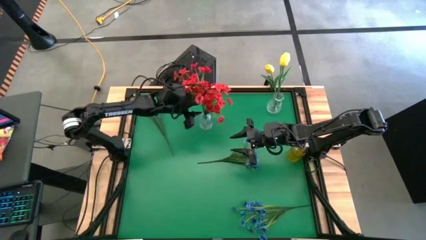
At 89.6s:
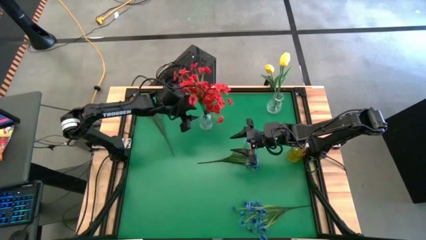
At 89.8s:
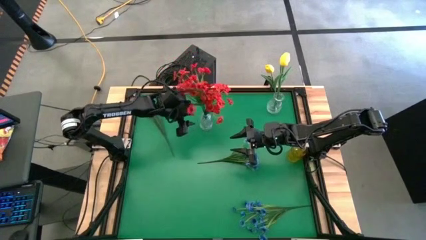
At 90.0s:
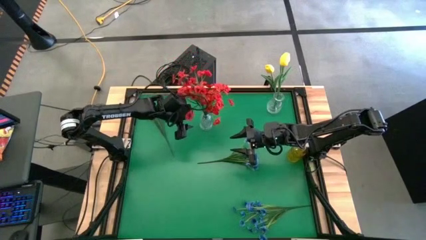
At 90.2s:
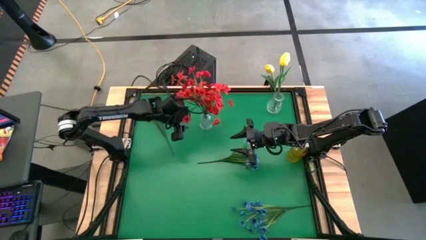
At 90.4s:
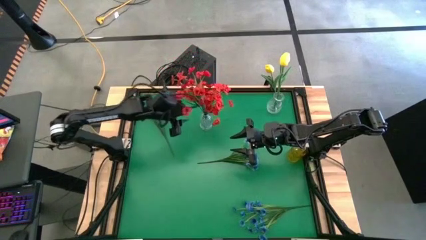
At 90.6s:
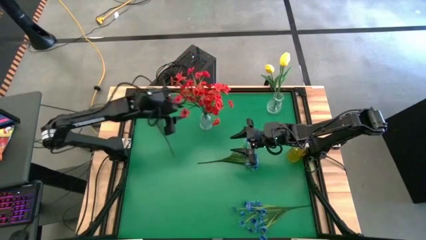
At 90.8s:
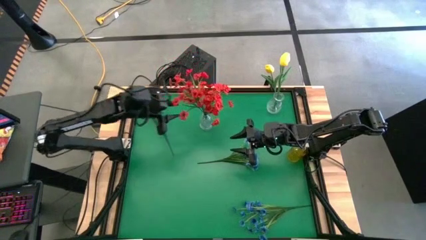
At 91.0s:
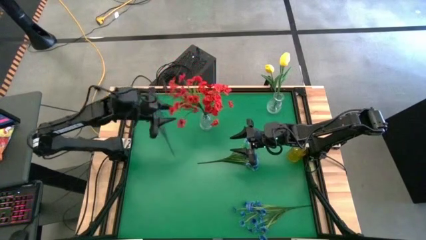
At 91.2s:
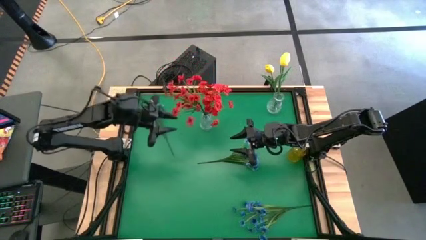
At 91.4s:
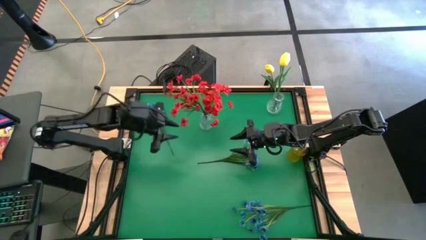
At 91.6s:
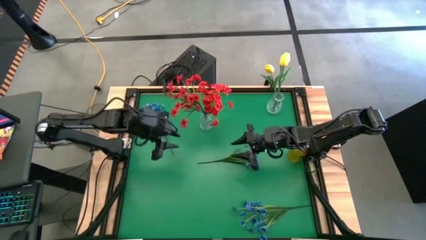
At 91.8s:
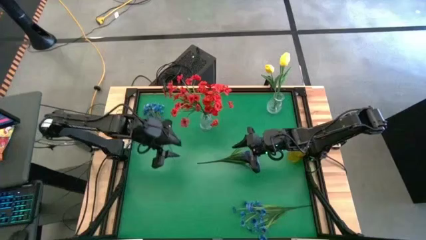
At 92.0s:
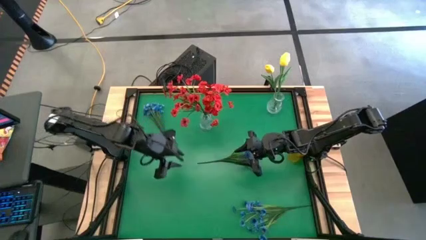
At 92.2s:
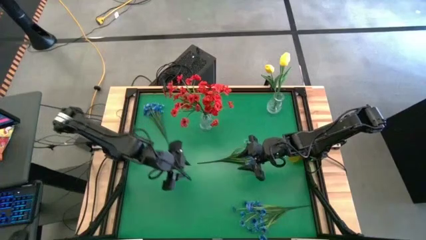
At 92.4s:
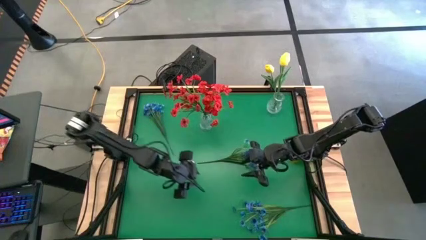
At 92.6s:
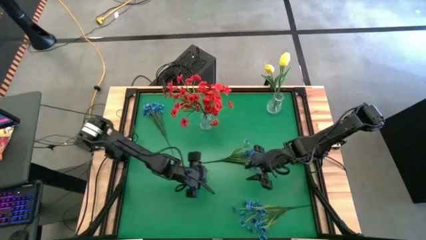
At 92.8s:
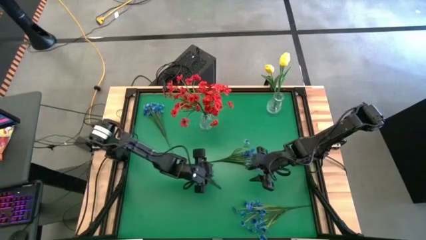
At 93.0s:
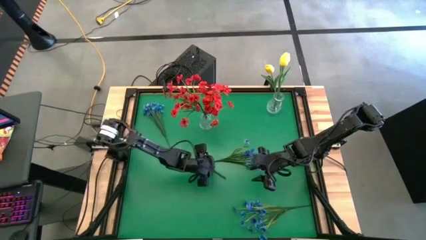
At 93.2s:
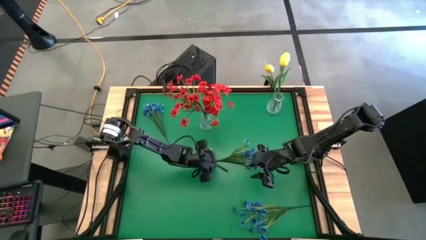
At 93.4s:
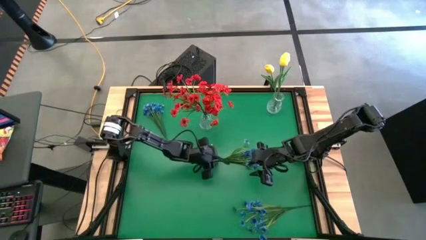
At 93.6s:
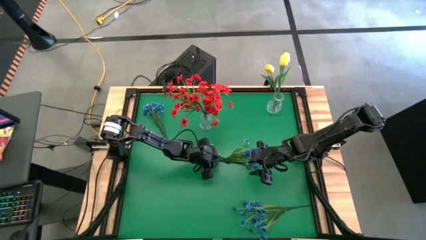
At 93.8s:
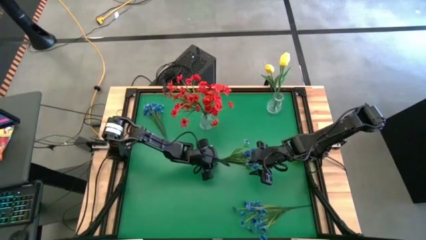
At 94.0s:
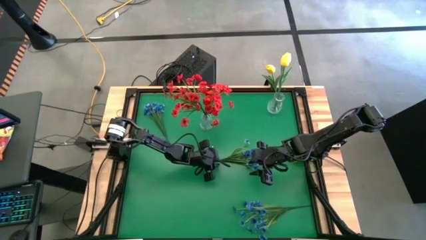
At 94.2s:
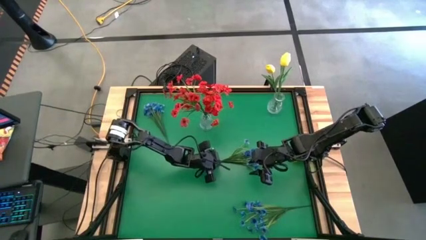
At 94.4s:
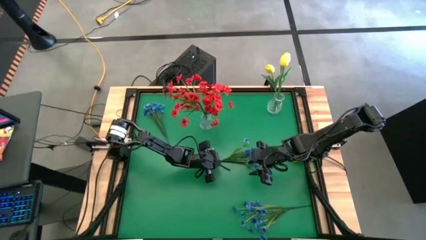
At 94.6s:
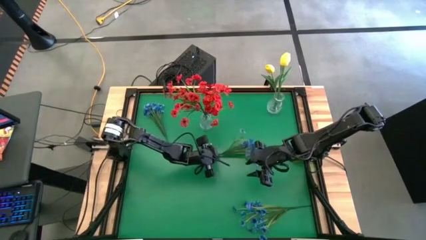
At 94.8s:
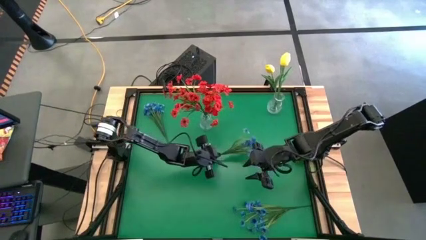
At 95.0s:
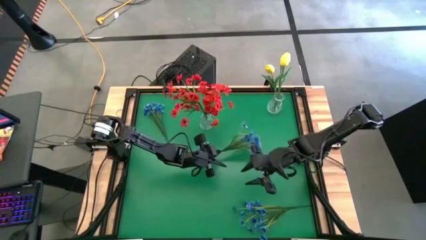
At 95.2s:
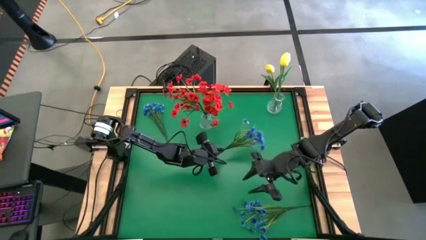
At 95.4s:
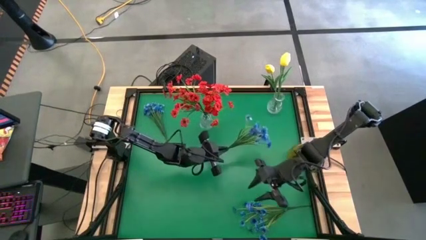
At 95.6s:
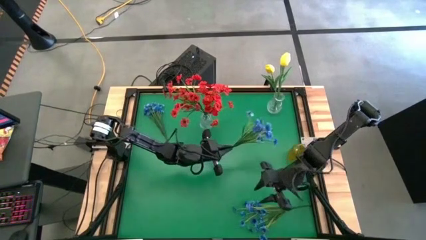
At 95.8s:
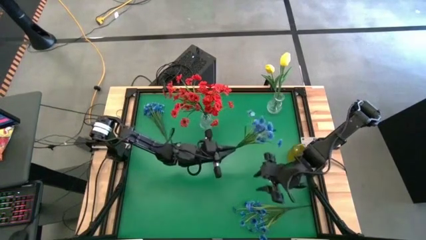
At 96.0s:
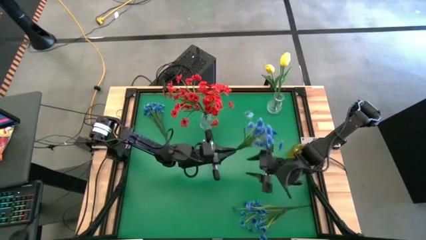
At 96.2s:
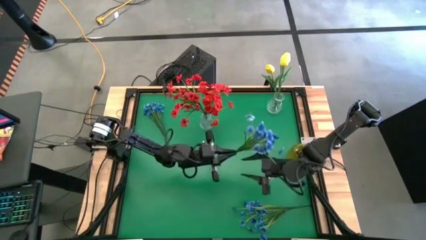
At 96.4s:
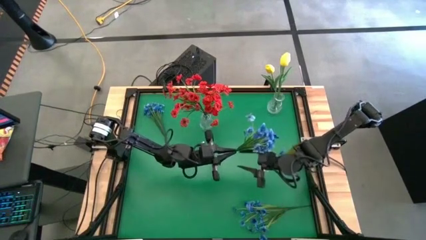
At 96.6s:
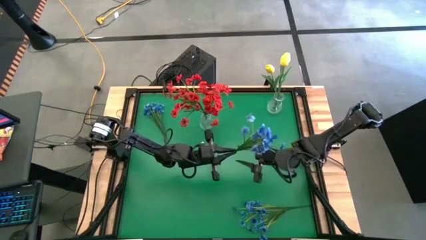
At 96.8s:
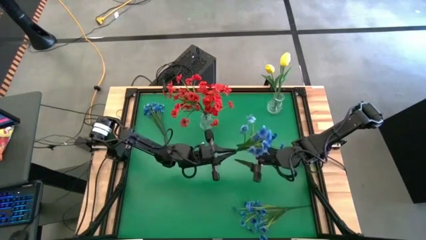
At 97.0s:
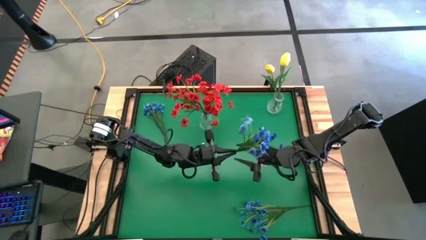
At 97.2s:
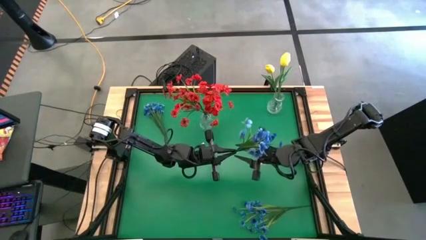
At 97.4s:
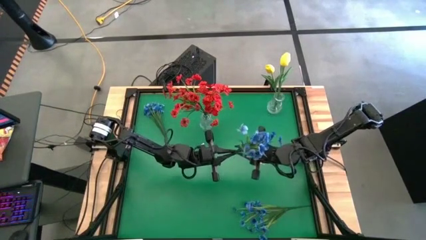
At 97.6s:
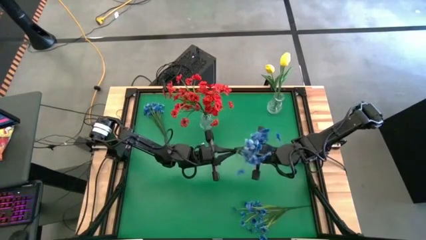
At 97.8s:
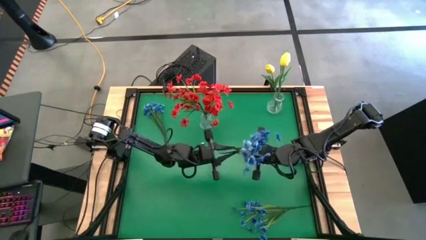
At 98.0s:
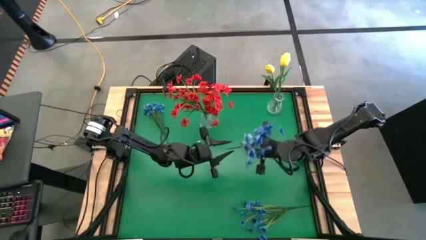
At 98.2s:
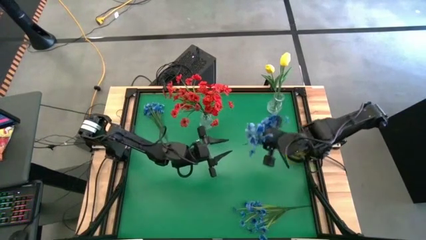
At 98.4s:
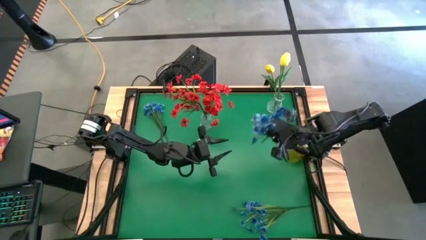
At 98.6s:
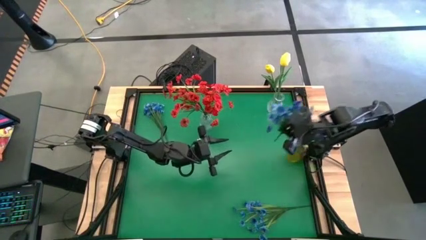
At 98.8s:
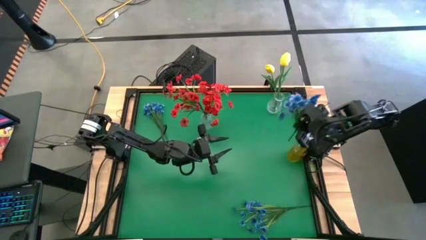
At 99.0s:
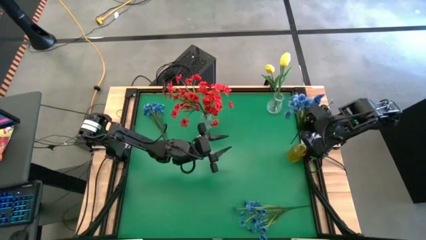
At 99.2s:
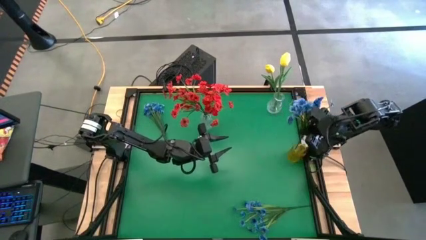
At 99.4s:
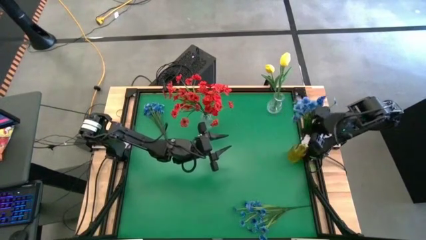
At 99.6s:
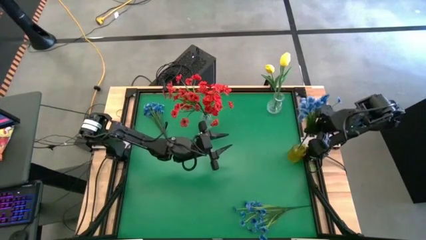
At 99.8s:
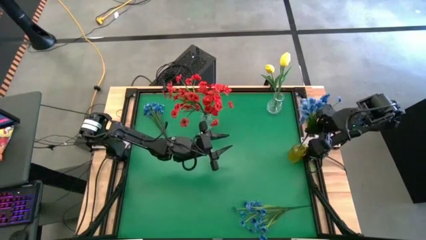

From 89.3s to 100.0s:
Task: Sort flowers into vase by color
Put the middle blue flowers into the yellow transparent vase

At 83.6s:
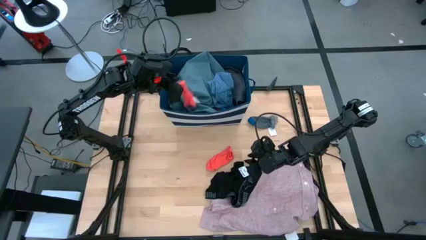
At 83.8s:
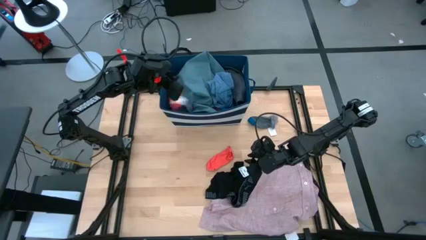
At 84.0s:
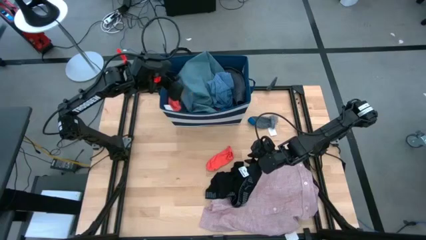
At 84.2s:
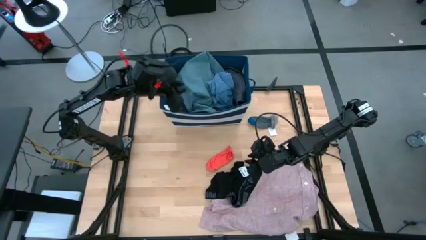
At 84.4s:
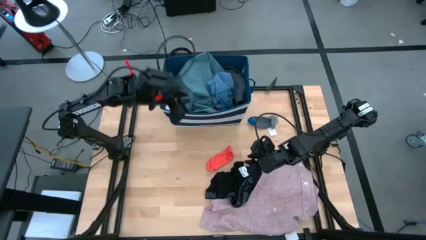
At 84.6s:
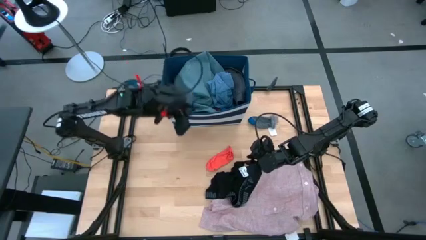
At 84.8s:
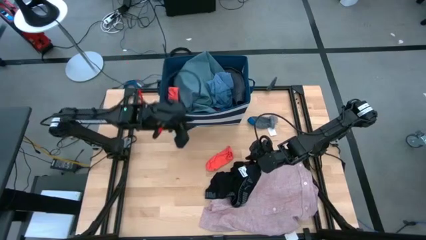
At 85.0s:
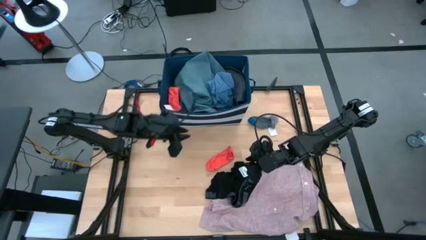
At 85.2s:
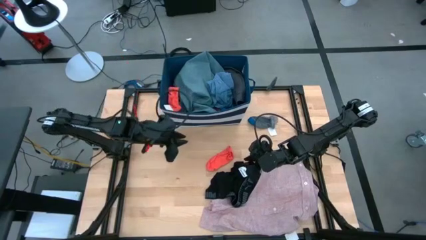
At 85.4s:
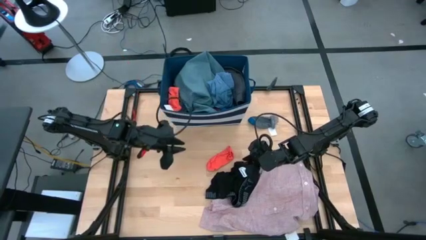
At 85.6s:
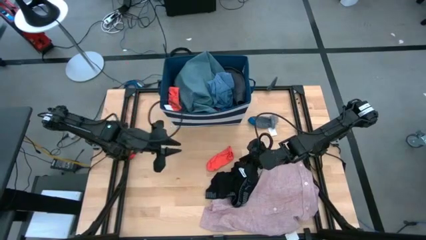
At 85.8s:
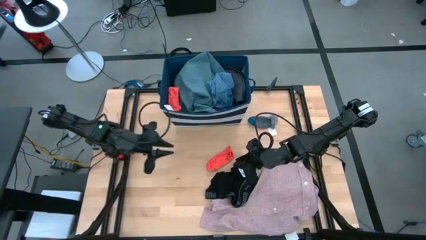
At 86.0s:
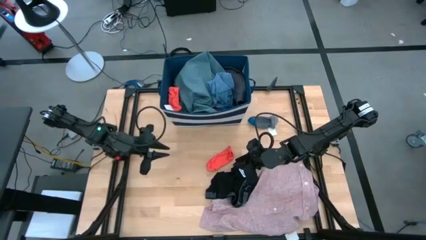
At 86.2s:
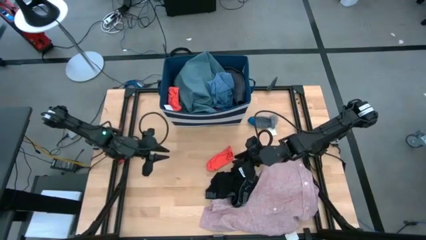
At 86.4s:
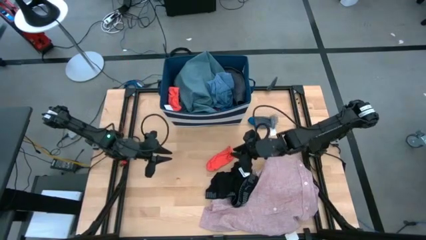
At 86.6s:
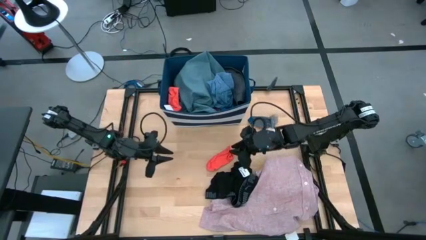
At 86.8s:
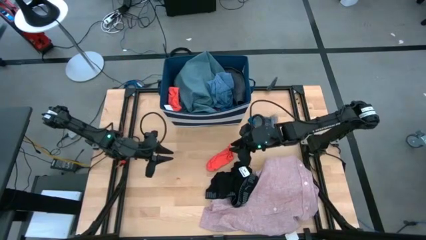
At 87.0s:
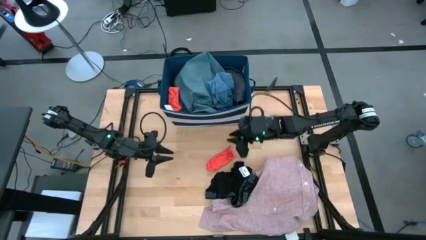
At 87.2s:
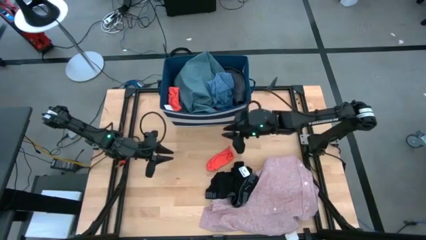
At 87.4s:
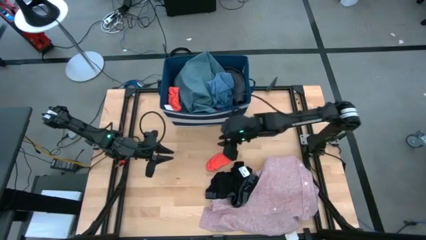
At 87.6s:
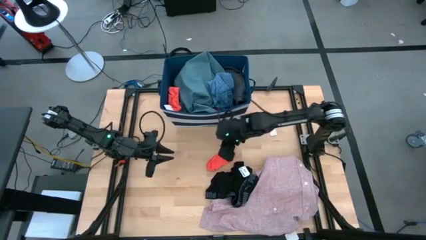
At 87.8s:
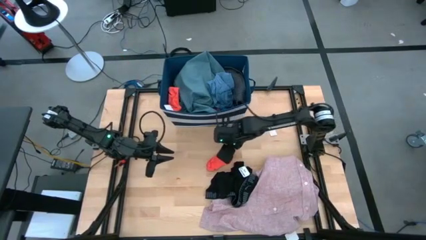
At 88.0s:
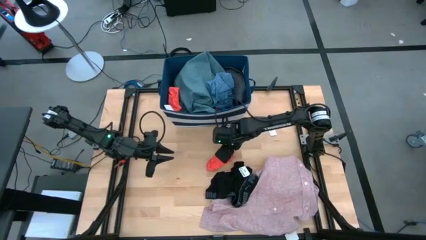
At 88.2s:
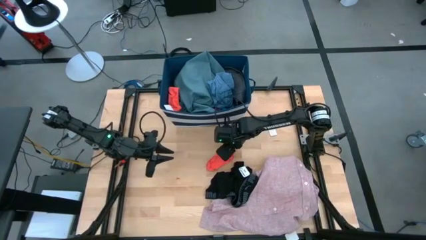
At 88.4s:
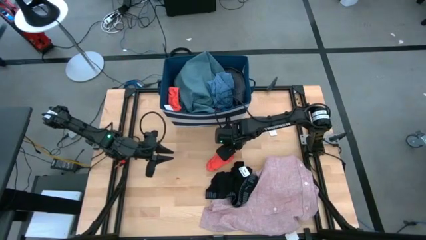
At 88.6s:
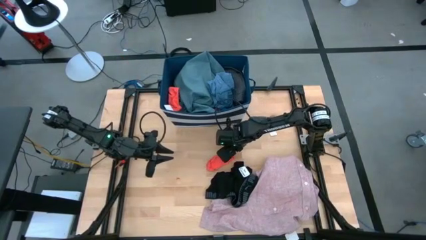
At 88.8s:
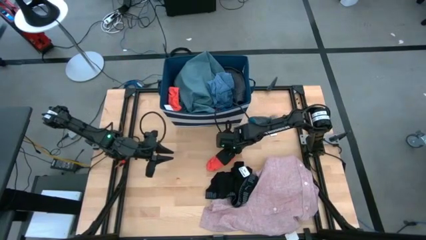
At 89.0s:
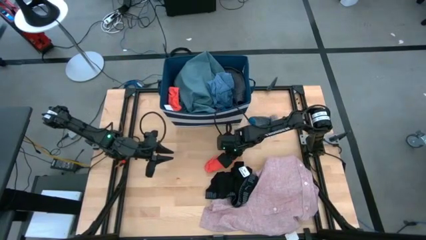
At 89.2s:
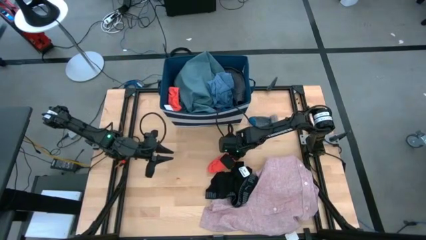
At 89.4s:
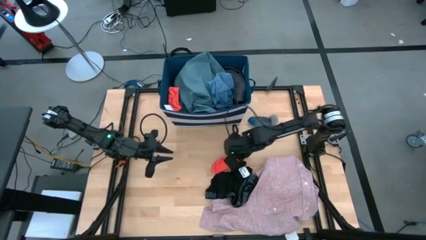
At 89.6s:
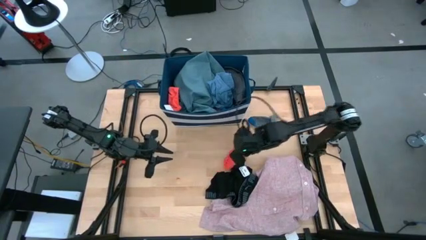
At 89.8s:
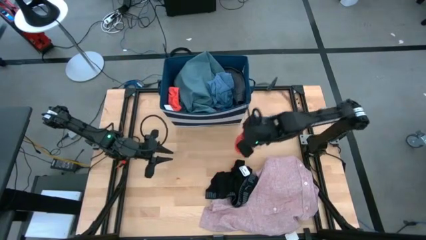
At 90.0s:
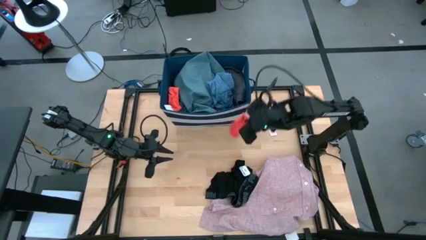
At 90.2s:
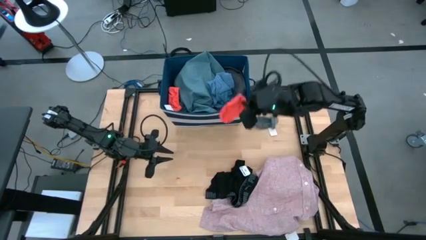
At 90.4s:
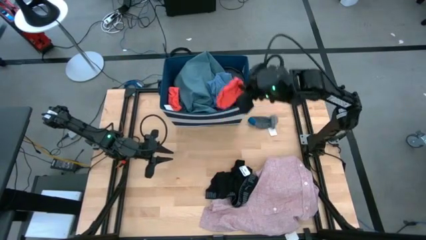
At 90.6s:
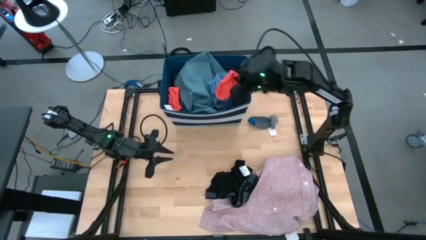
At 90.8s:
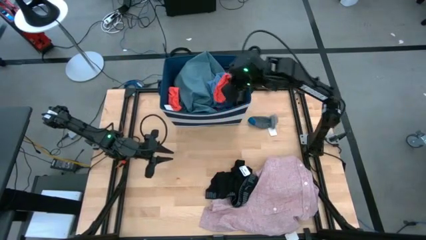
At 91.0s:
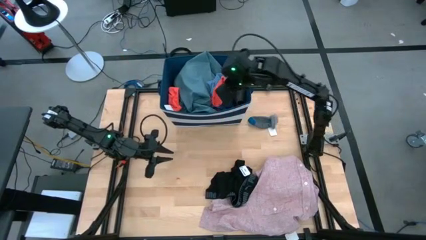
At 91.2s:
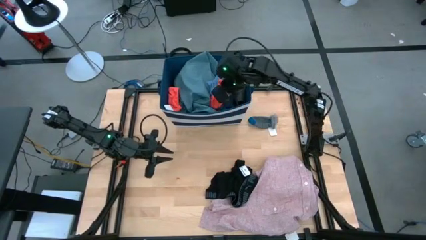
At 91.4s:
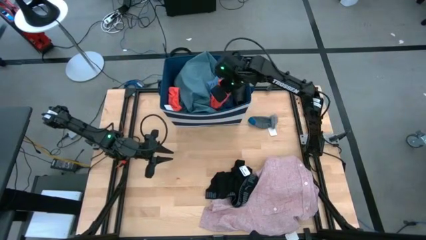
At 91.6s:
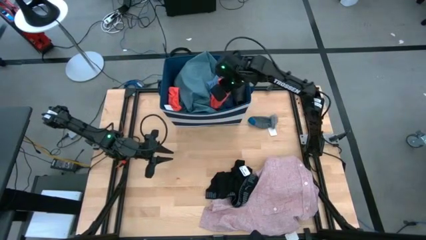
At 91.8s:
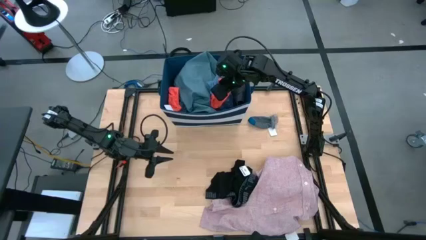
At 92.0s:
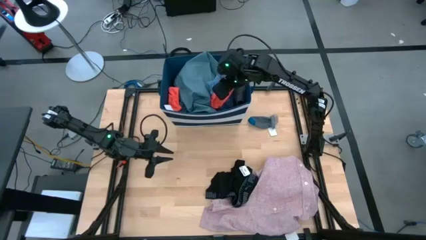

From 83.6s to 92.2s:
Task: Sort clothes
Put the orange sock into the blue bin
